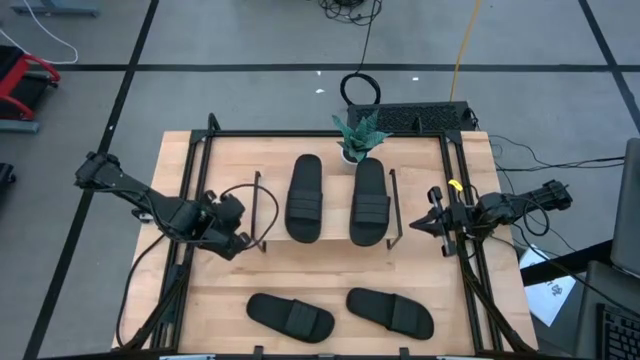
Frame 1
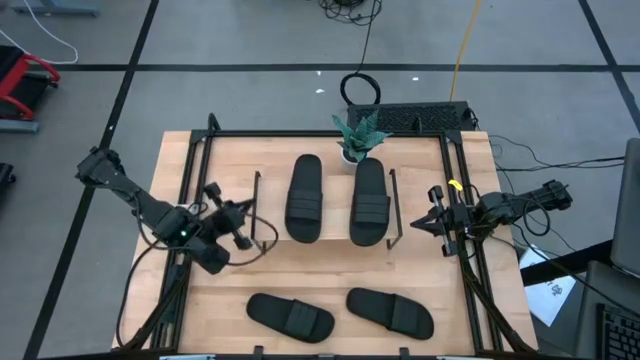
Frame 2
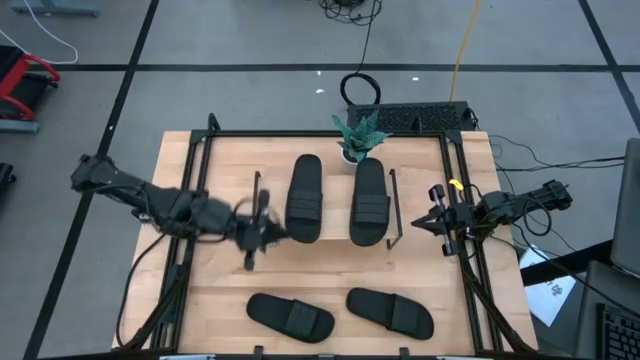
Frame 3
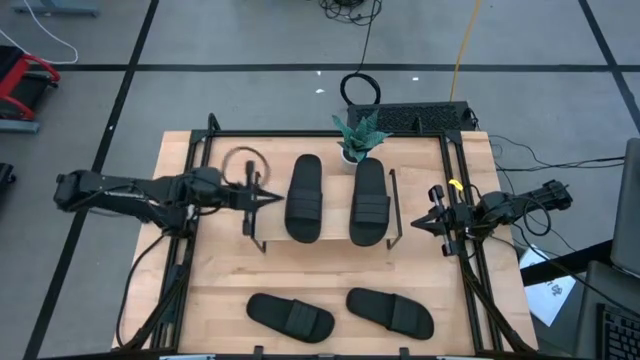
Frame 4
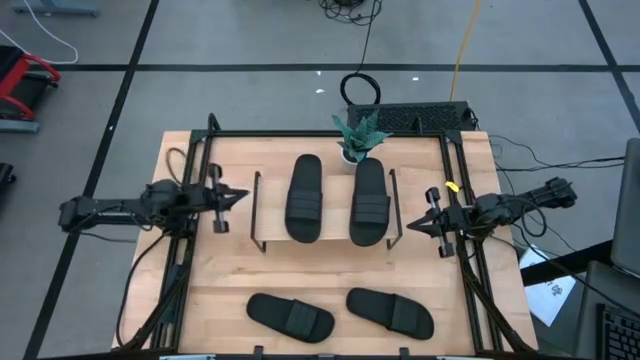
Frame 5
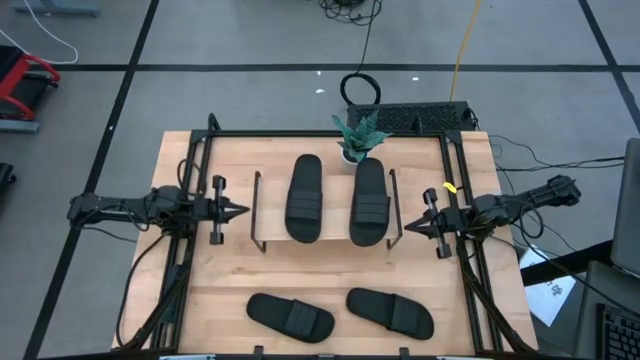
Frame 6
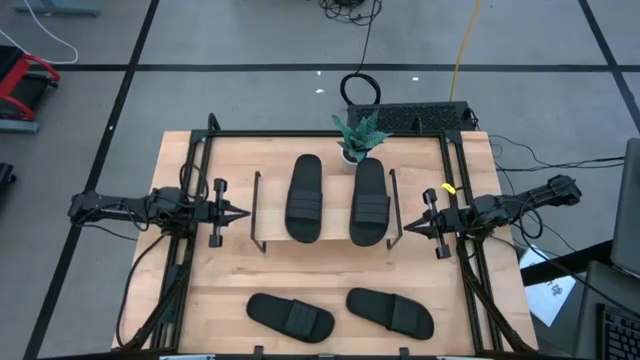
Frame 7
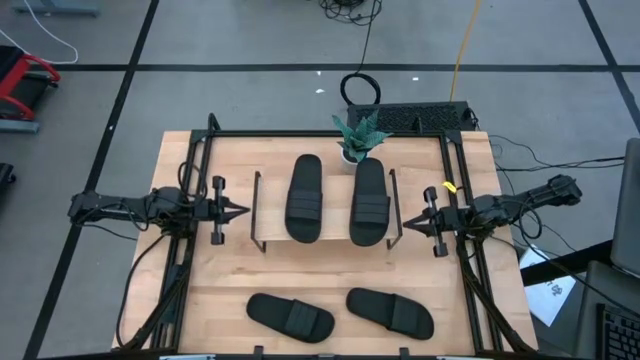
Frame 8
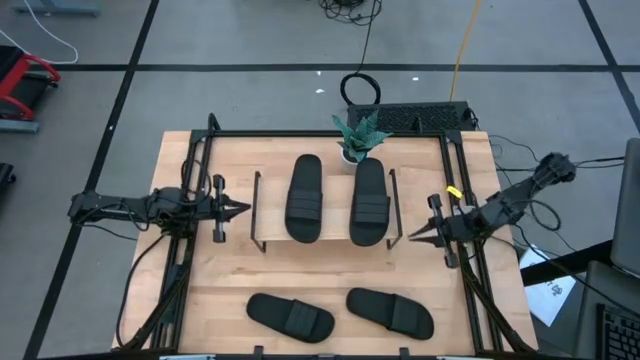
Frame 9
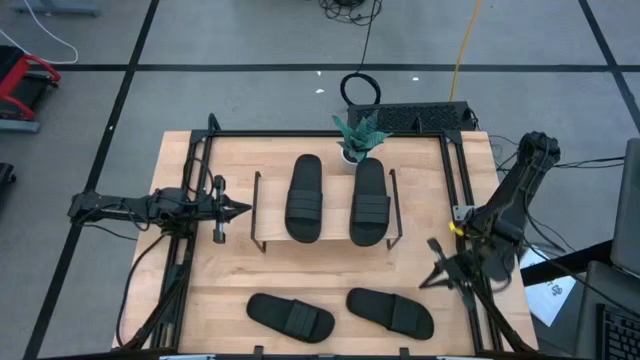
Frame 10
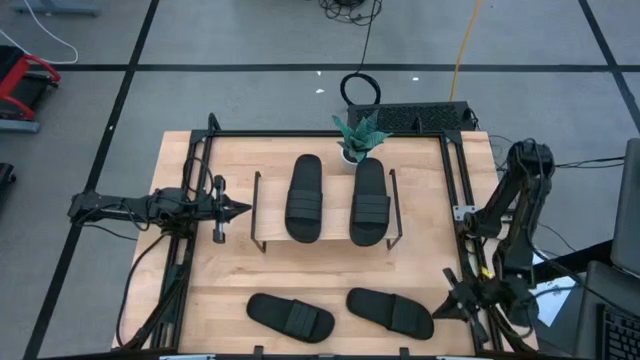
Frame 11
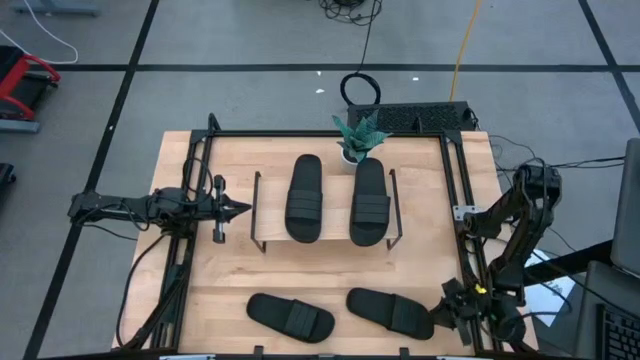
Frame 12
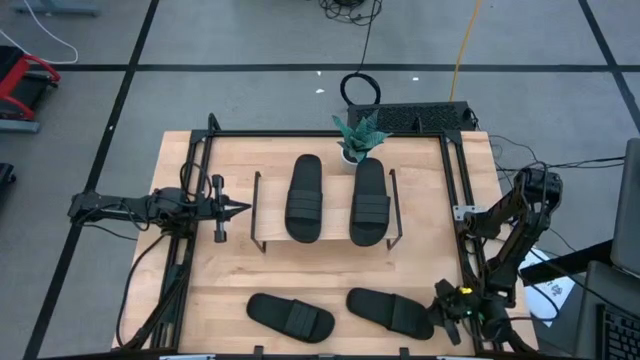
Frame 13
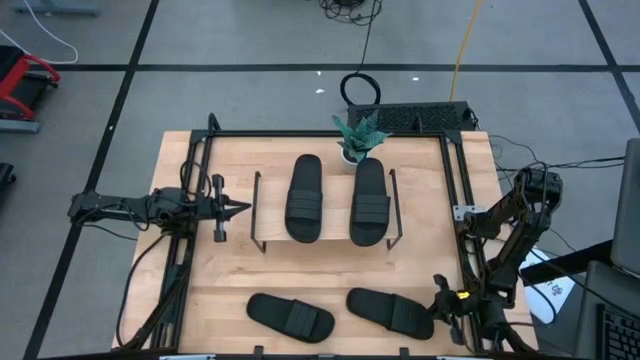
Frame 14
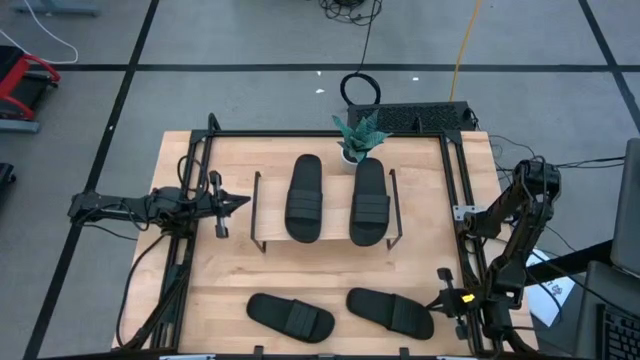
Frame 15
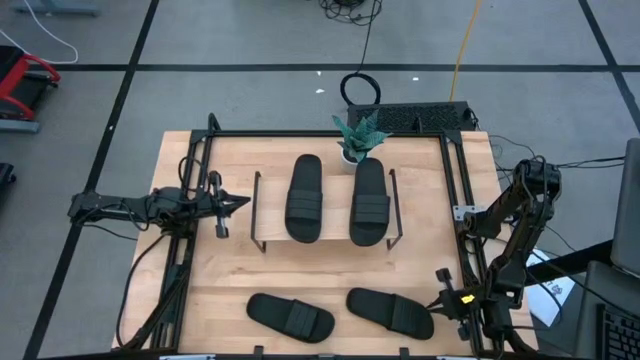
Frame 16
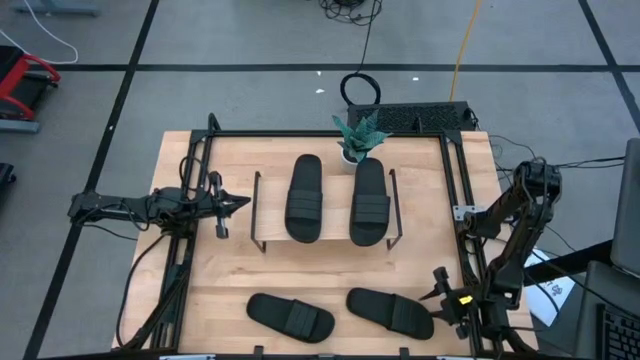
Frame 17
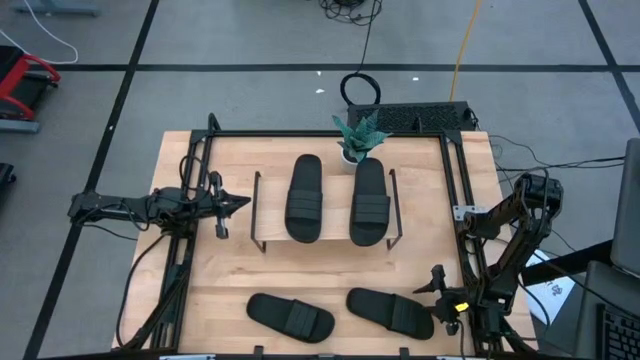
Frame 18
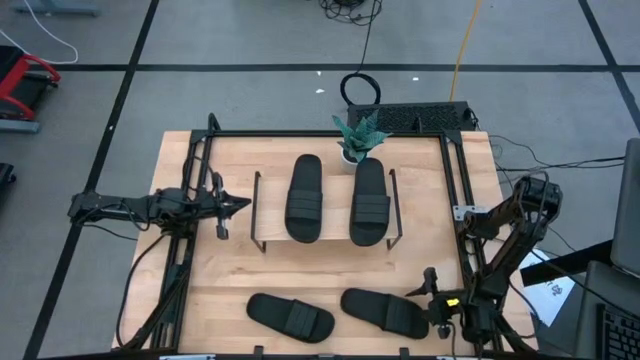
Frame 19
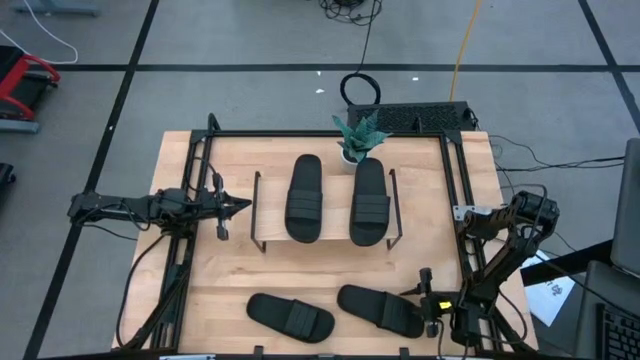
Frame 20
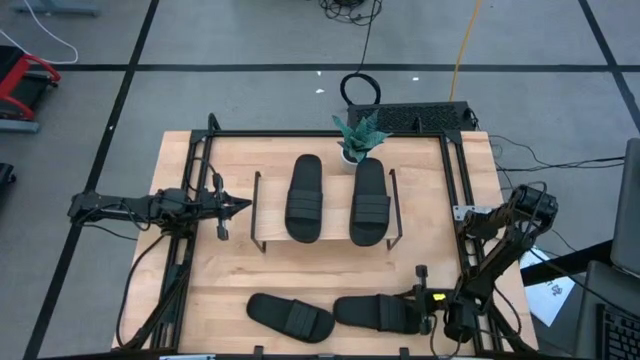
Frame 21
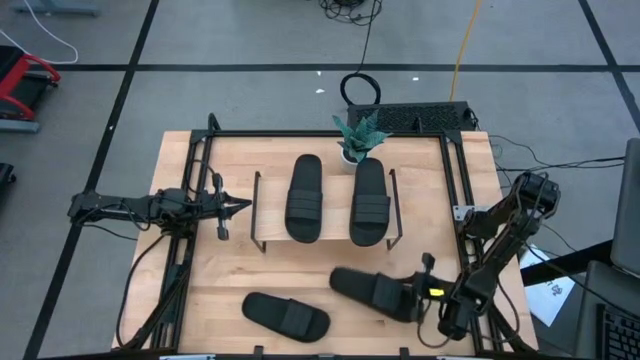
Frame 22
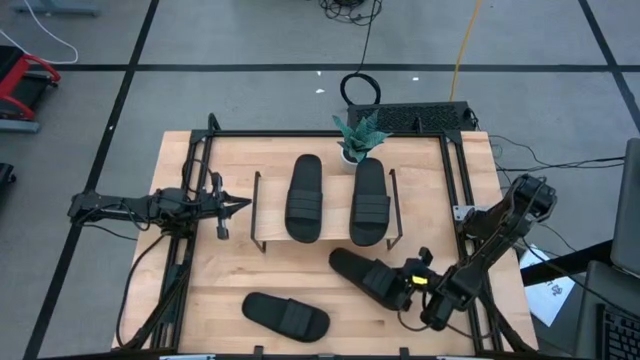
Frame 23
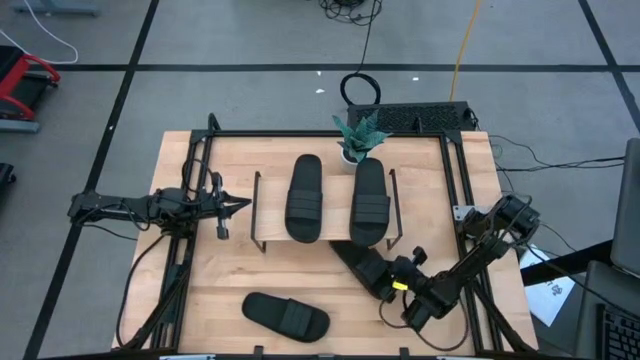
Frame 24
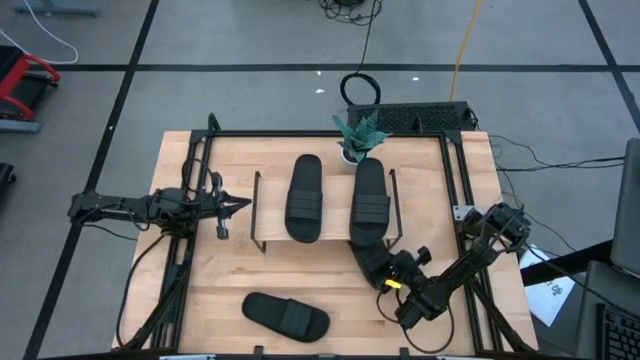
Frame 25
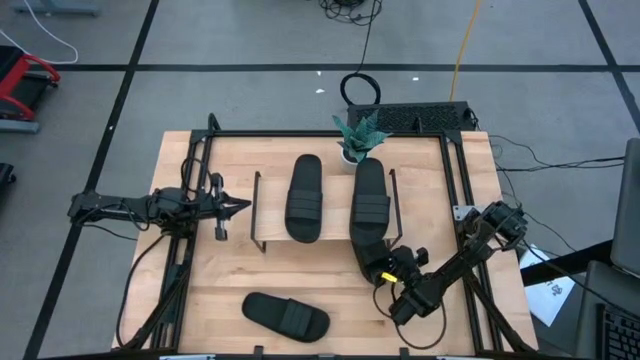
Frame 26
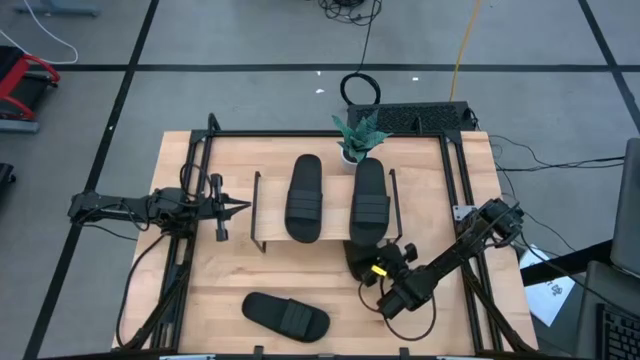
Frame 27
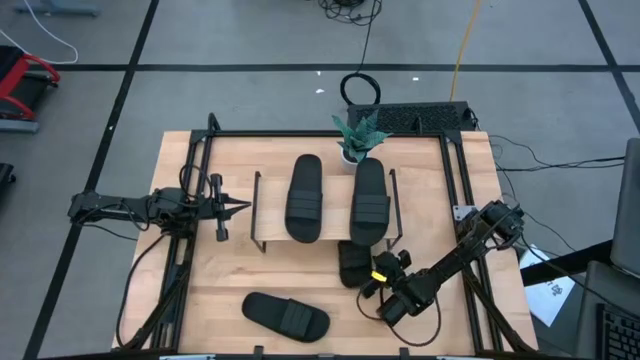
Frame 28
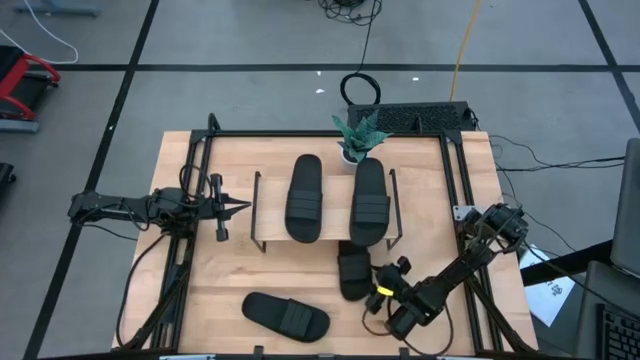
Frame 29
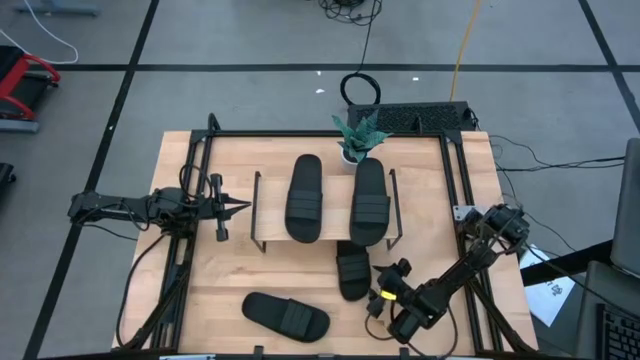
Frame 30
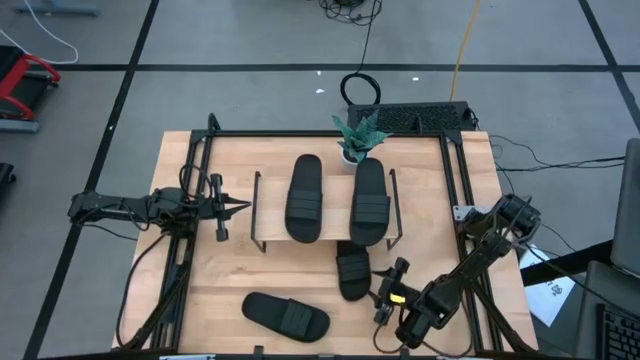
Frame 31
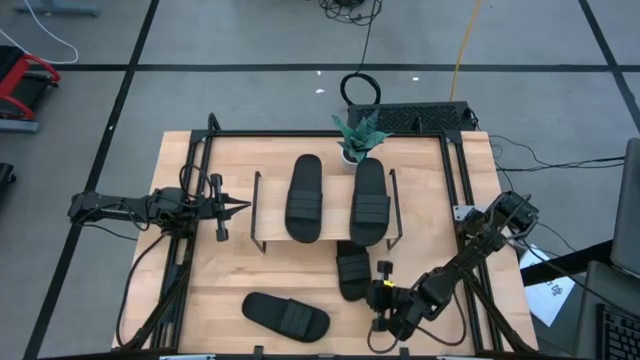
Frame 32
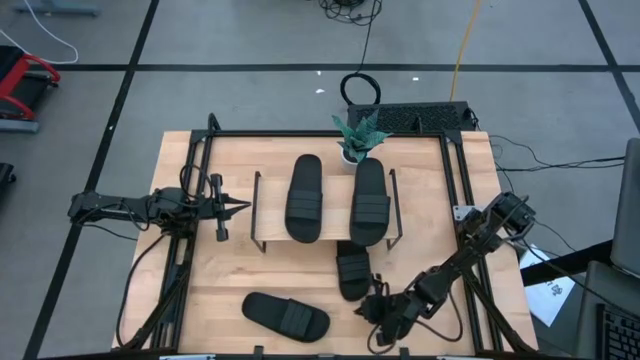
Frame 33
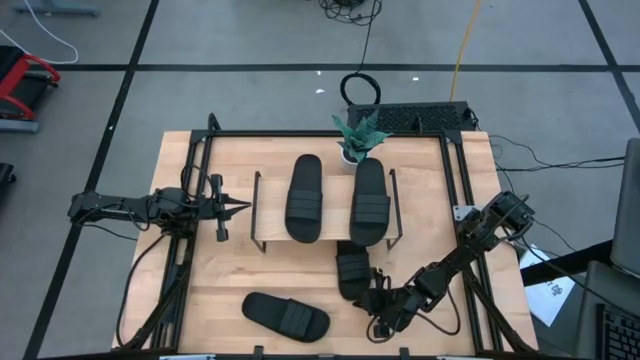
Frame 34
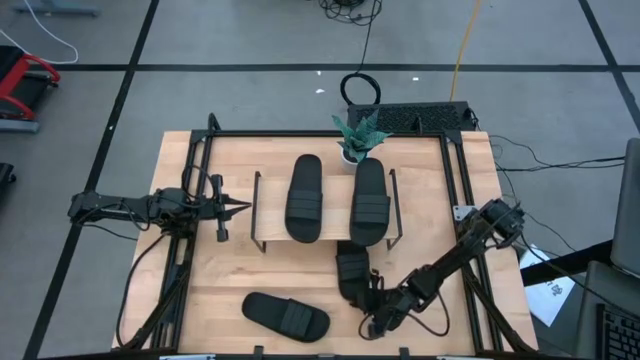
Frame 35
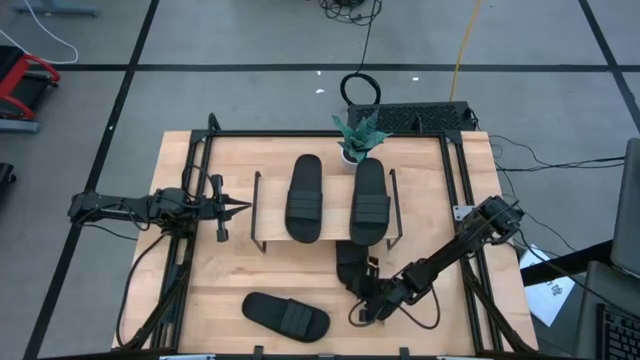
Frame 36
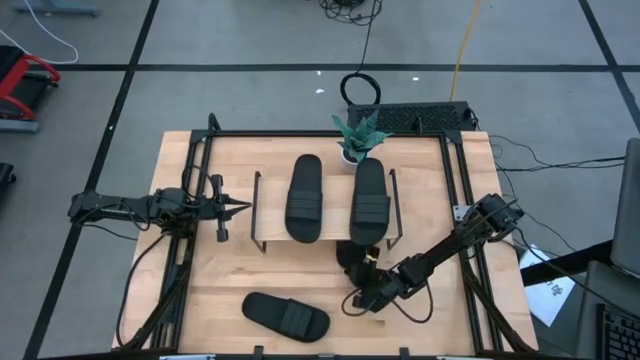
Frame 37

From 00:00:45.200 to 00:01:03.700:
Task: Pick and place slides into the shelf
Put the right black slipper under the shelf
